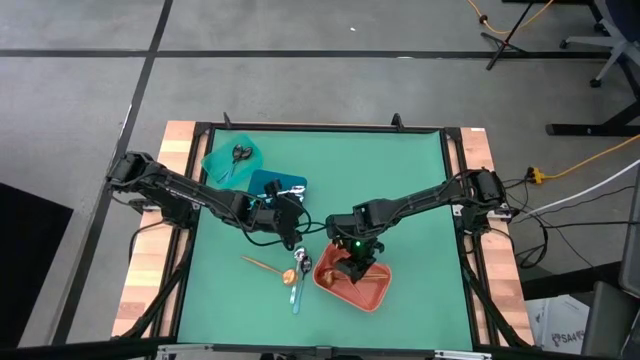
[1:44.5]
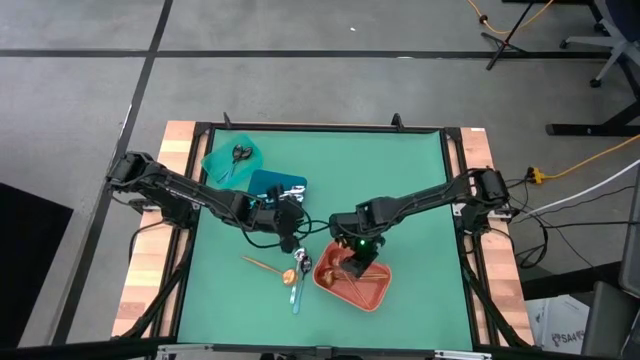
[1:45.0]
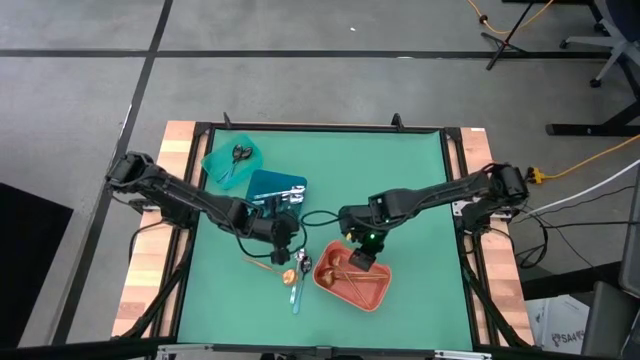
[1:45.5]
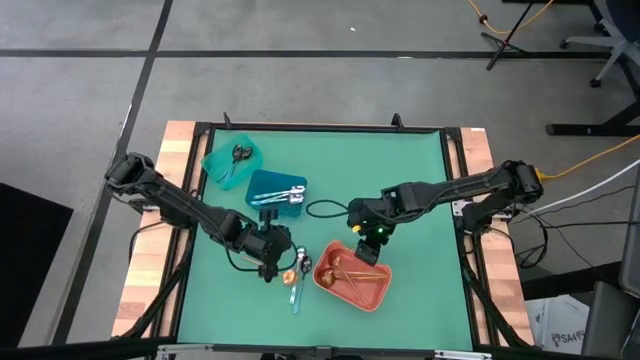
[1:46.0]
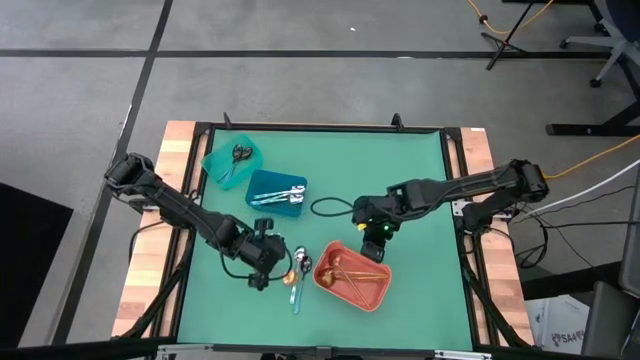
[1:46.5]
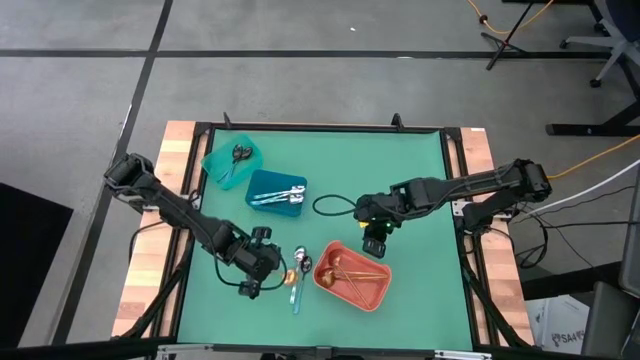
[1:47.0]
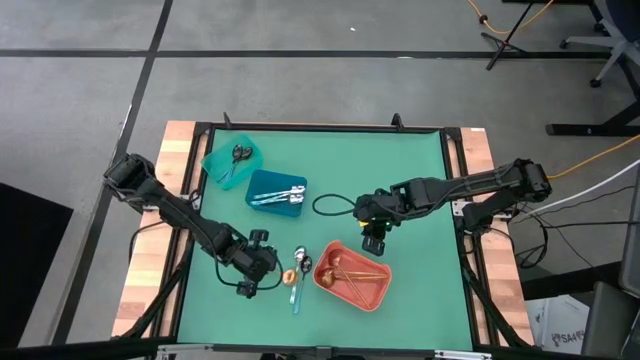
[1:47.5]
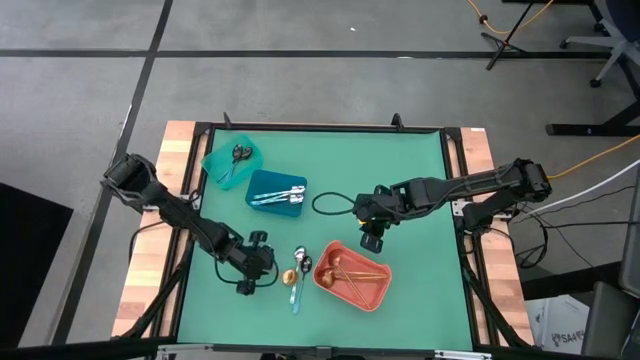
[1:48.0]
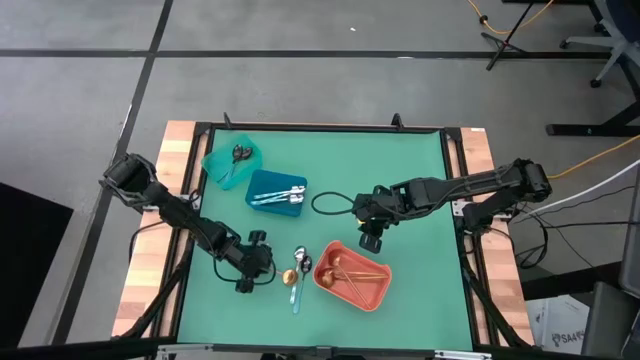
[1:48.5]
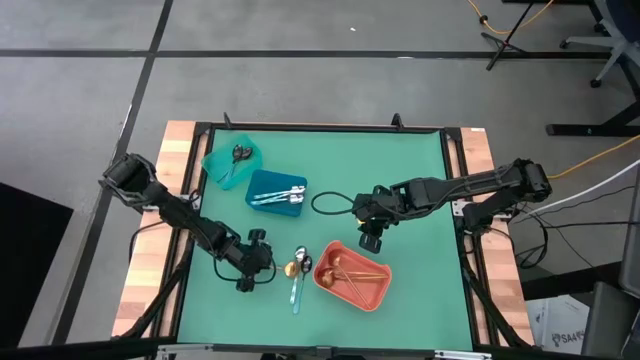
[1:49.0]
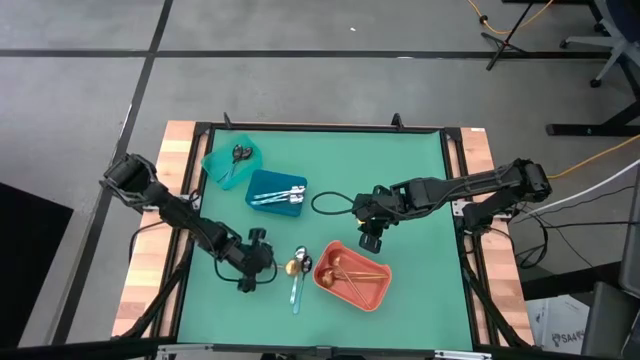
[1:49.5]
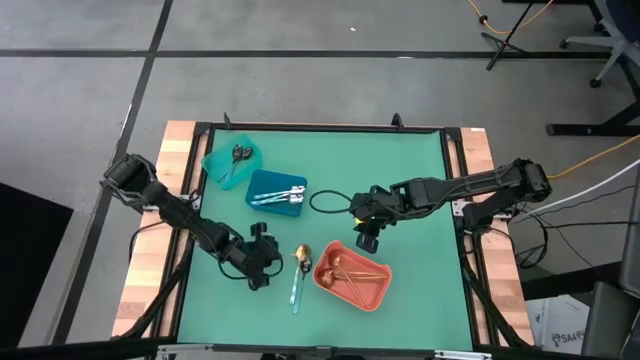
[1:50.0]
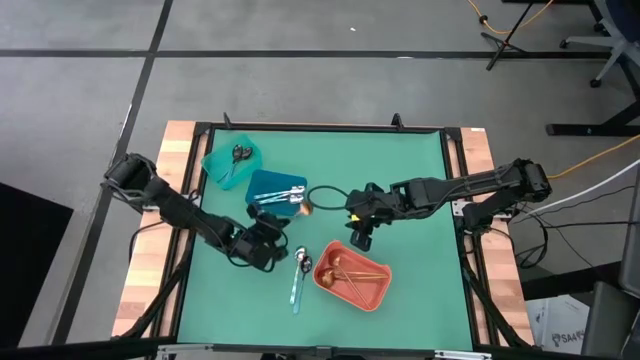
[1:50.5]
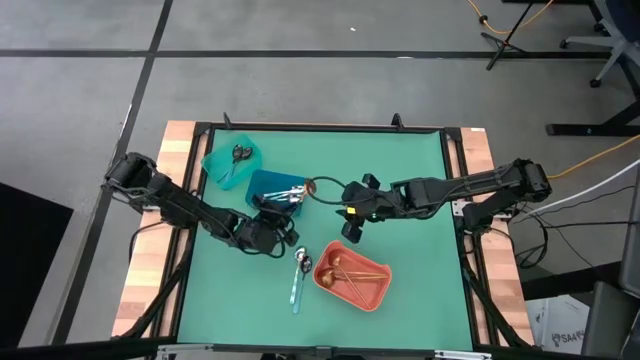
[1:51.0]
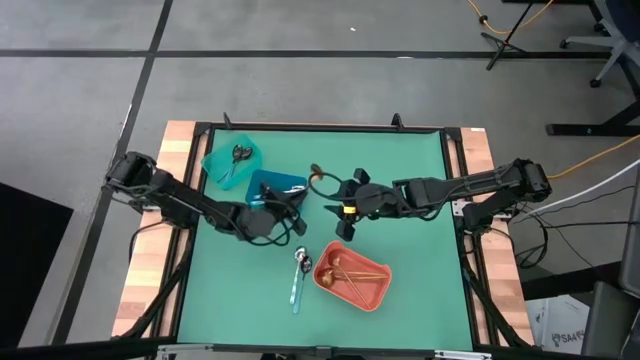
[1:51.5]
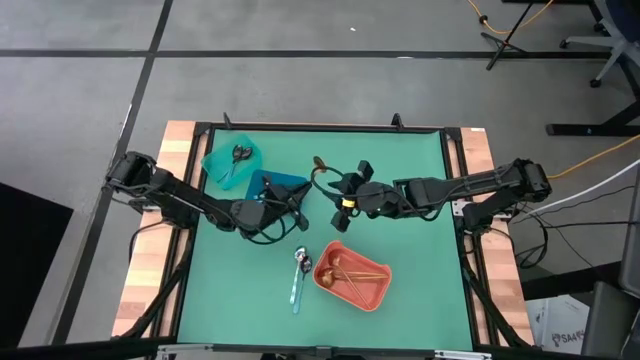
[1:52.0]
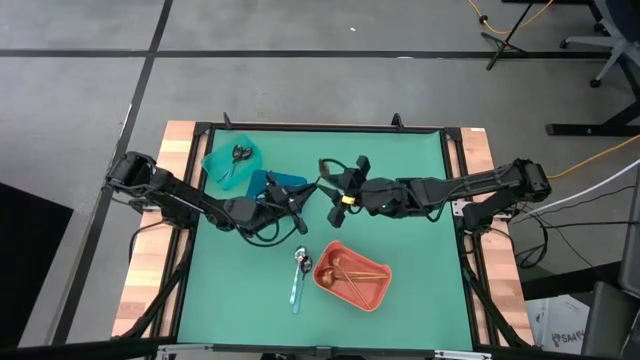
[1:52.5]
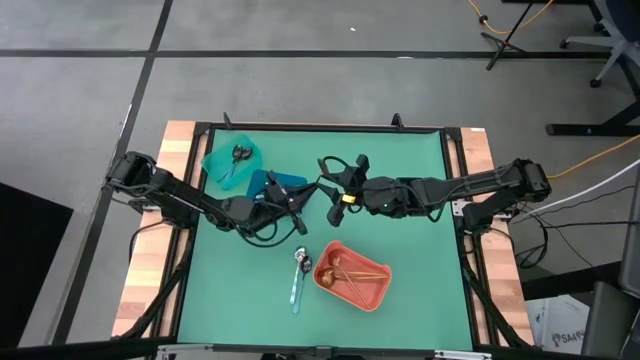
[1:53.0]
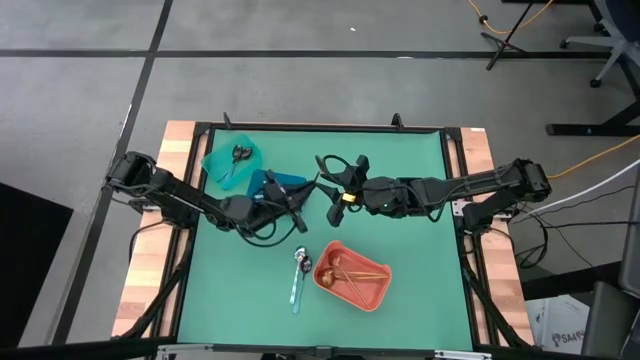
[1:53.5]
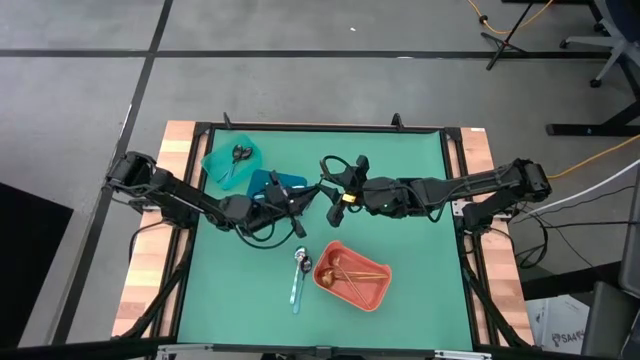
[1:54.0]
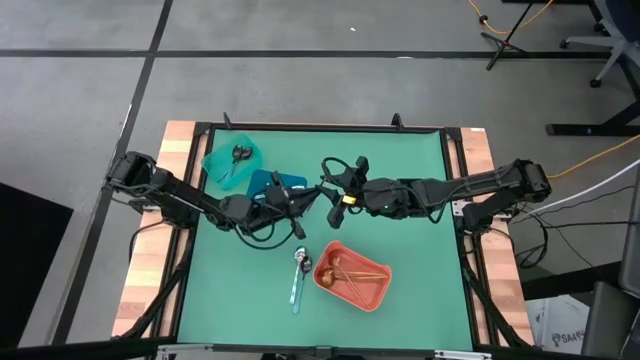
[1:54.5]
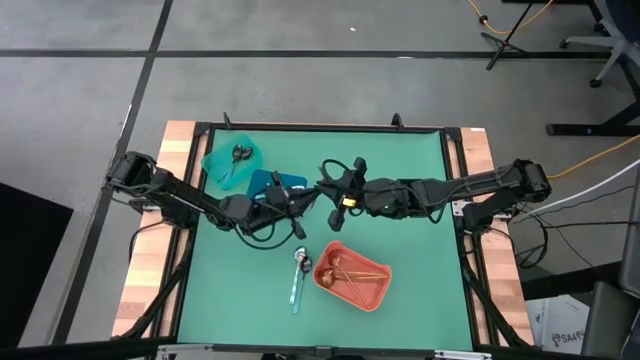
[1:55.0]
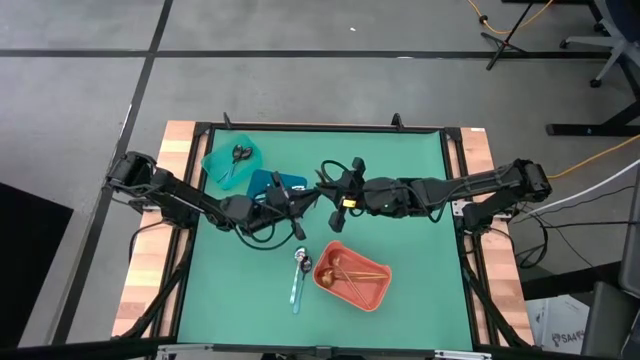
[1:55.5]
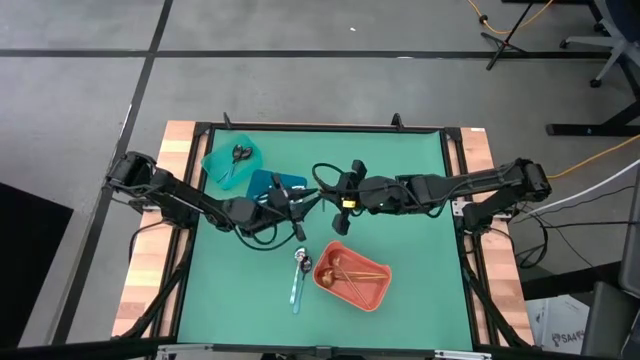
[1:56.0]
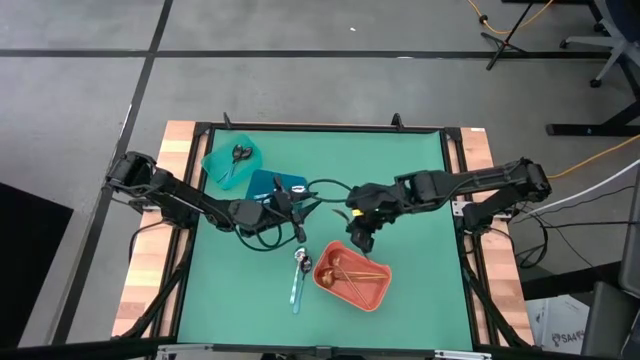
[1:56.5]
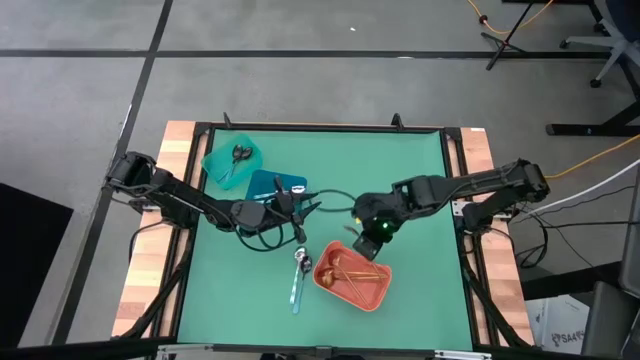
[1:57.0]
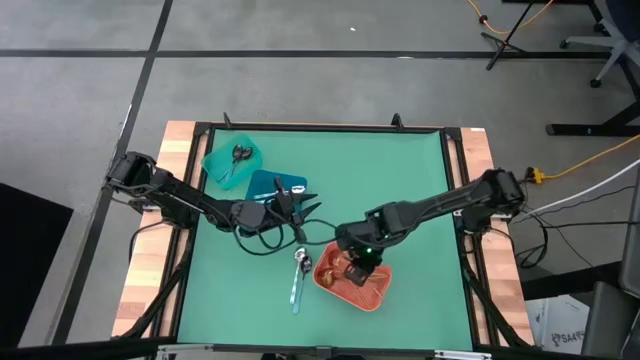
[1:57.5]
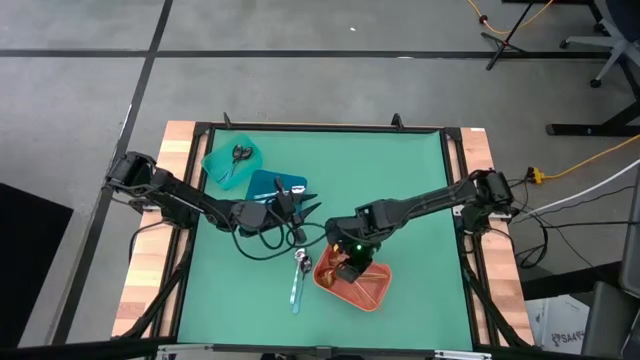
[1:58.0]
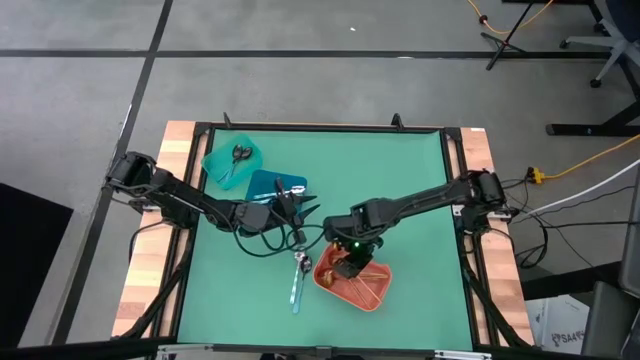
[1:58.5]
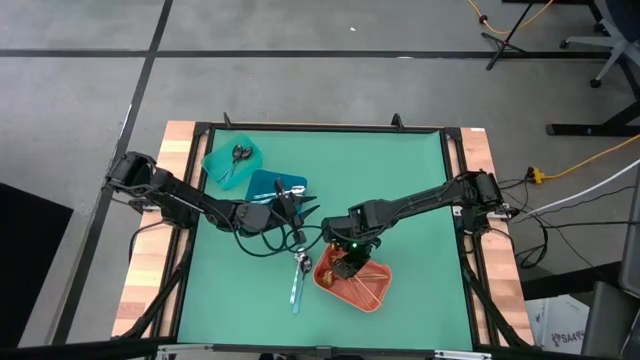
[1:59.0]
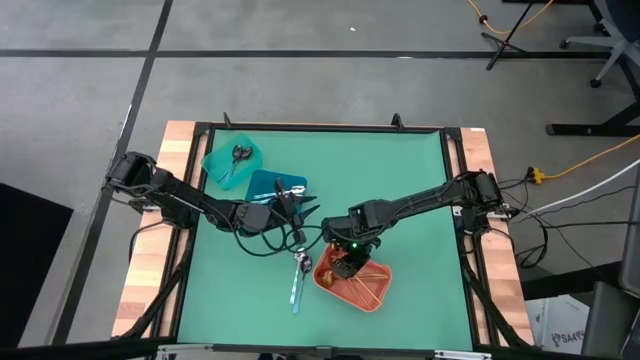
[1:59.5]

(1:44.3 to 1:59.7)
Task: Sort silverware by color (type)
Put the yellow spoon into the orange bin

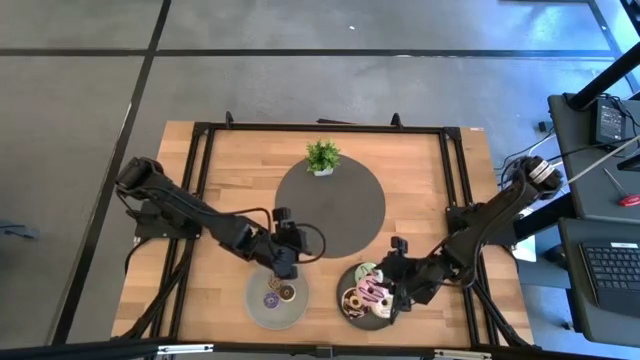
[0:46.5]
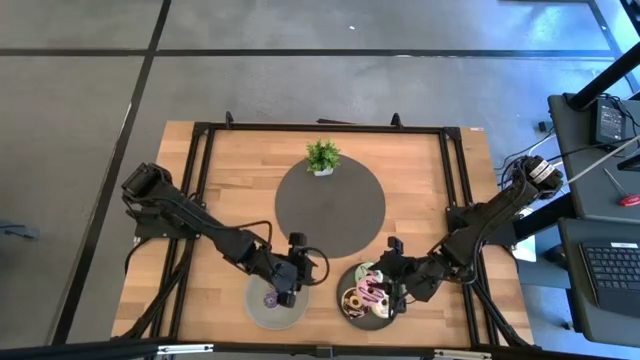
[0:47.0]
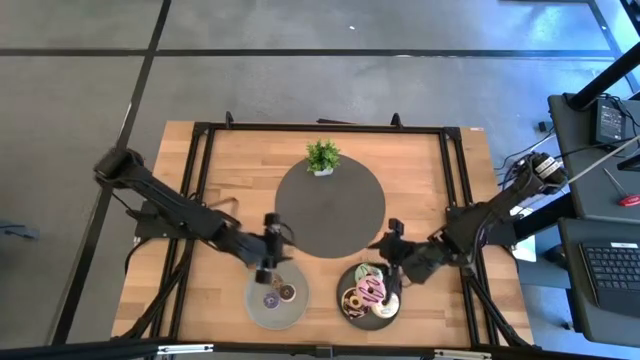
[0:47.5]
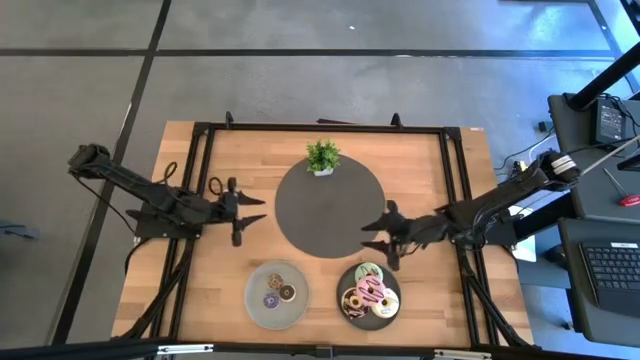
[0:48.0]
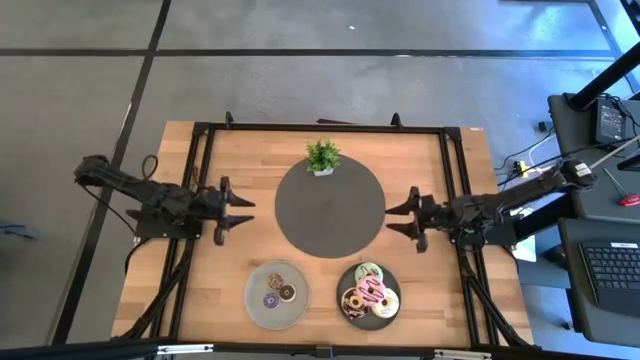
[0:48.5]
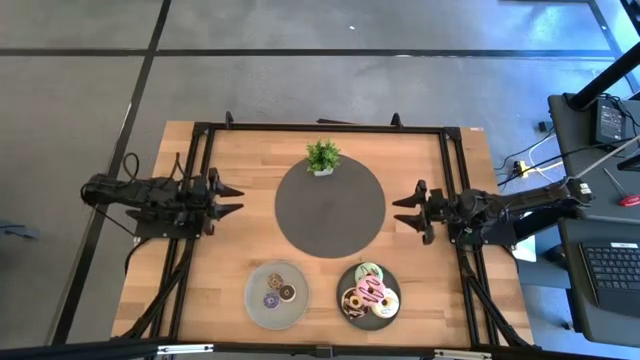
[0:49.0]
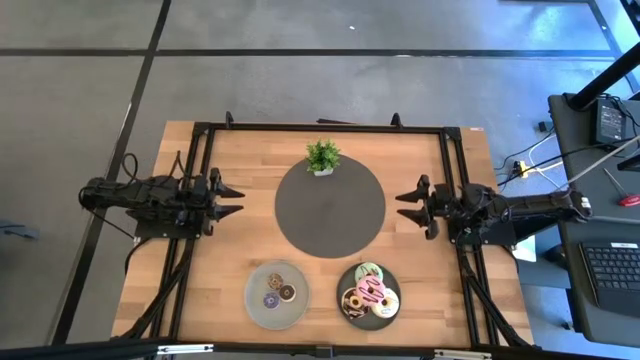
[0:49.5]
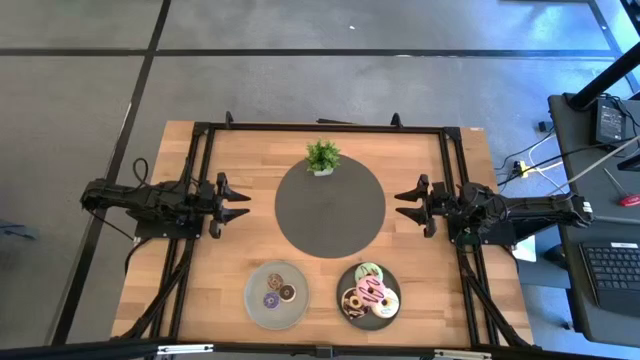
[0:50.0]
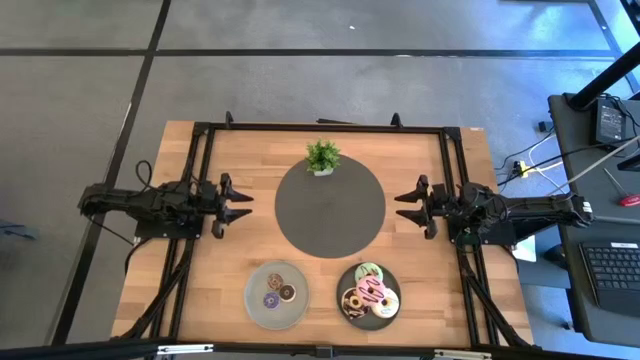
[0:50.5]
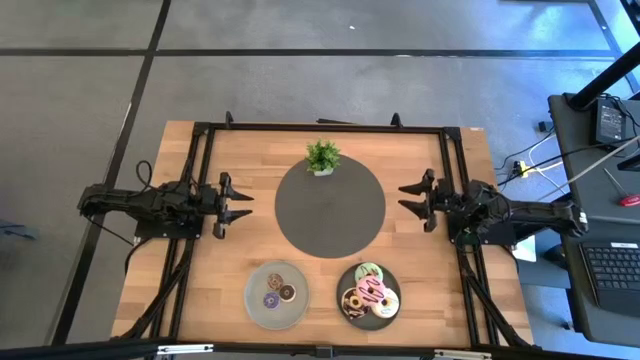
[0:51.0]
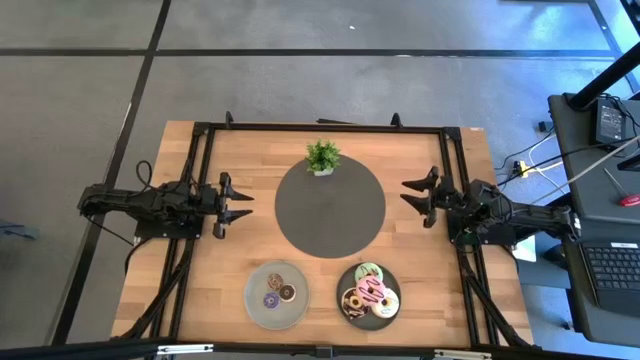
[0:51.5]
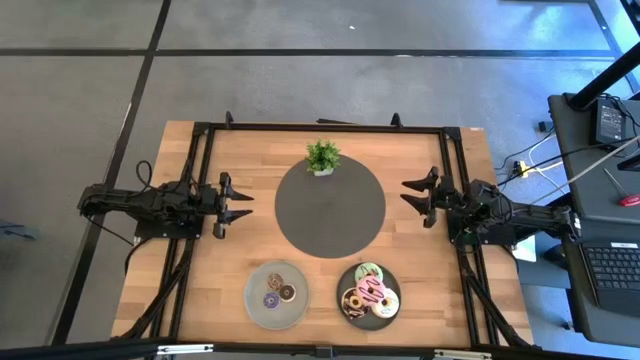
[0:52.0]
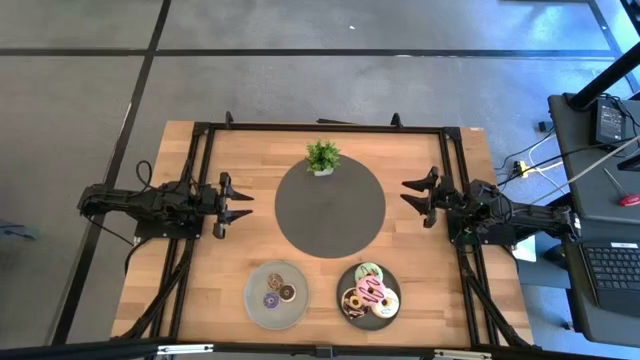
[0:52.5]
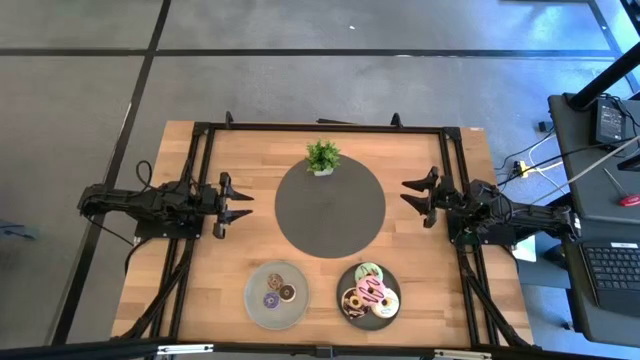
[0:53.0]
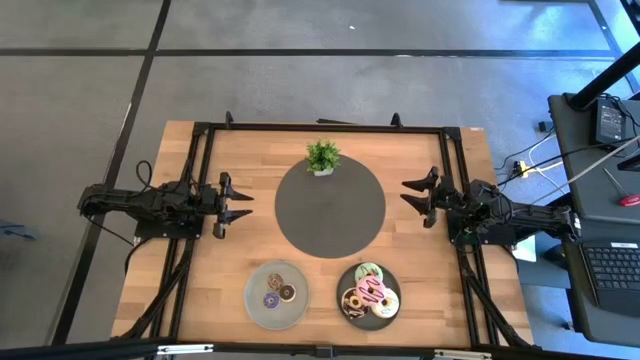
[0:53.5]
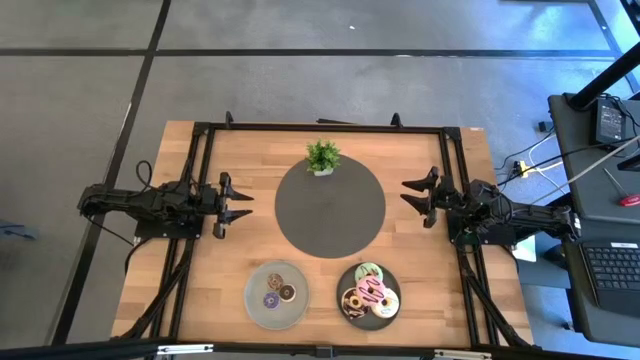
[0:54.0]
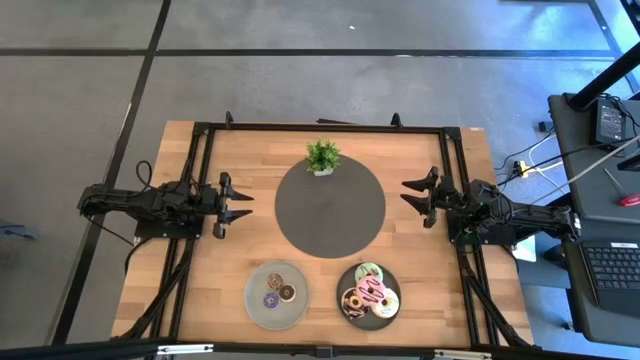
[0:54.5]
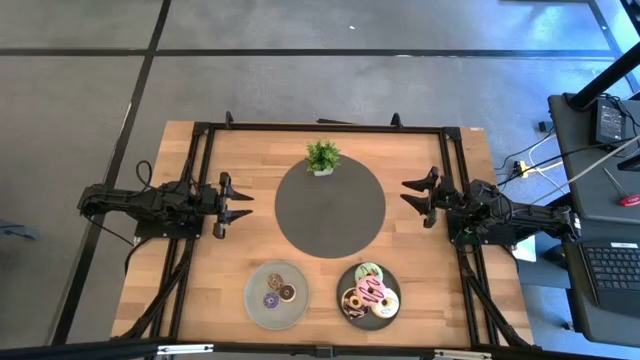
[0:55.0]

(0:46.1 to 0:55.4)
Task: Pick & Place donuts
Return to Home Position
